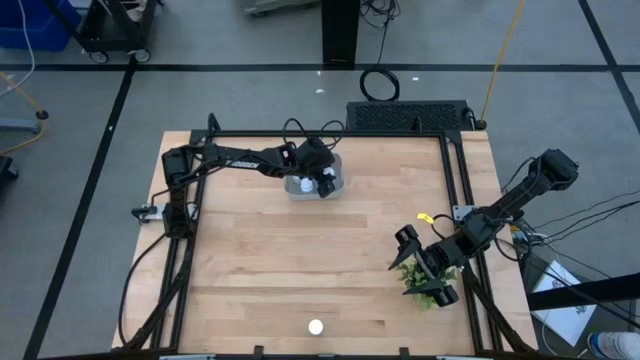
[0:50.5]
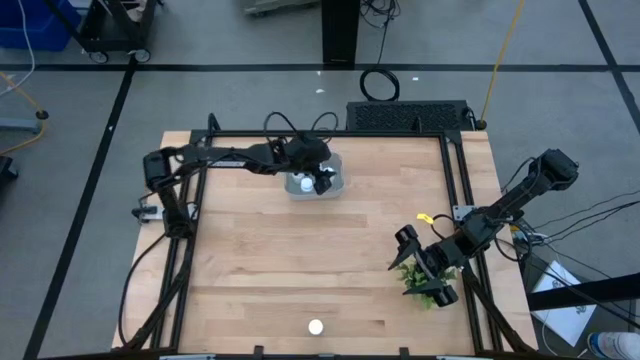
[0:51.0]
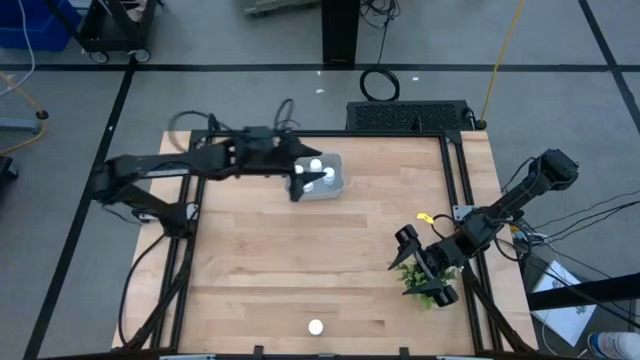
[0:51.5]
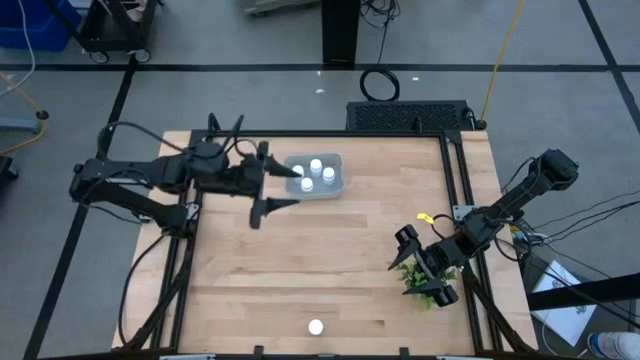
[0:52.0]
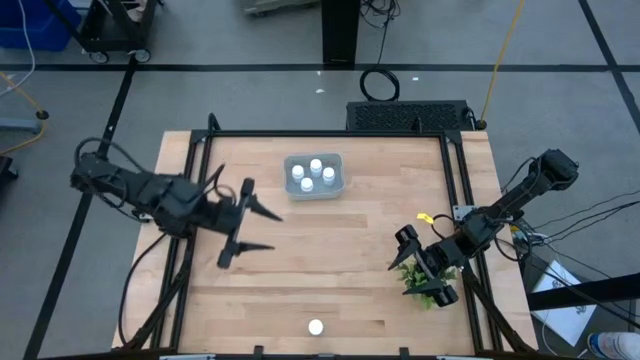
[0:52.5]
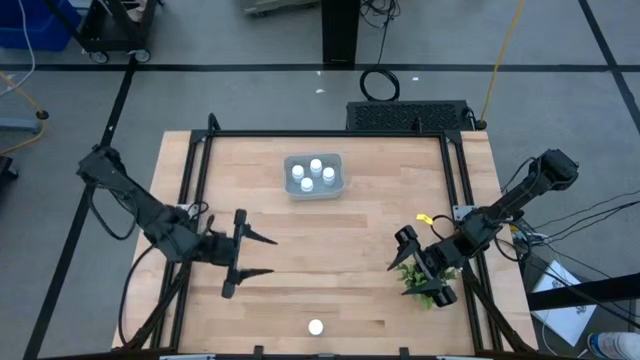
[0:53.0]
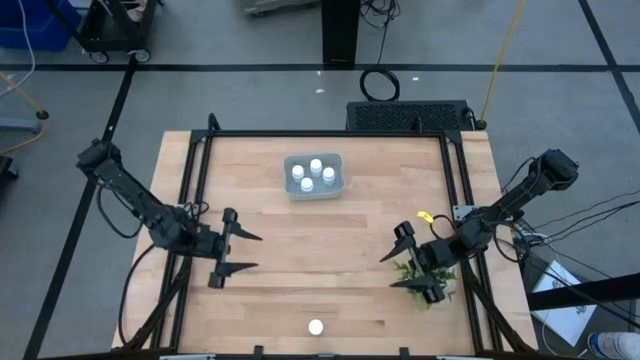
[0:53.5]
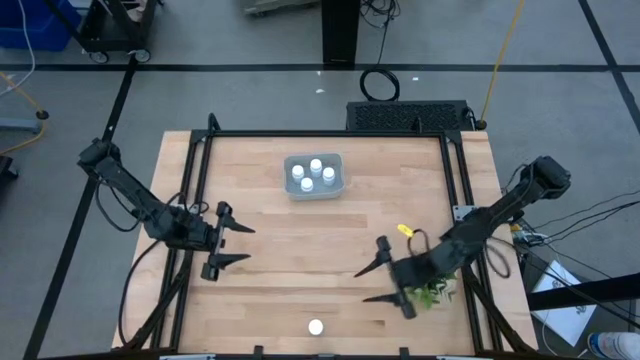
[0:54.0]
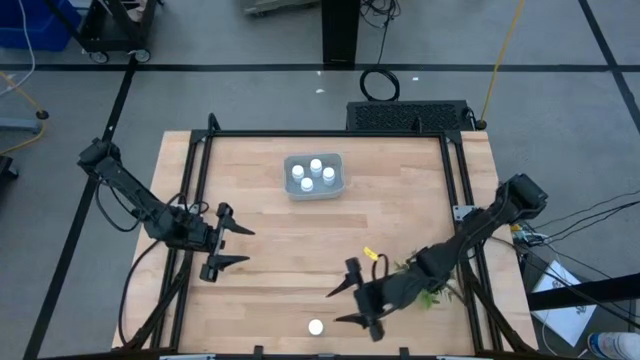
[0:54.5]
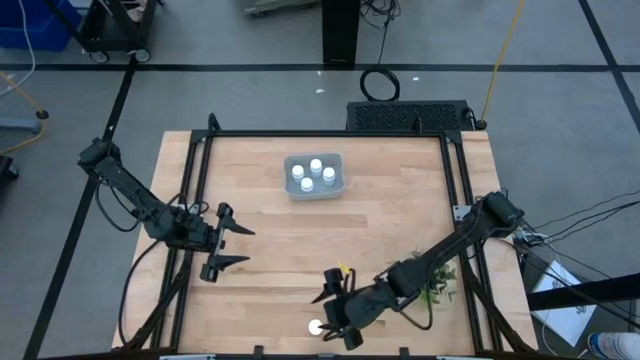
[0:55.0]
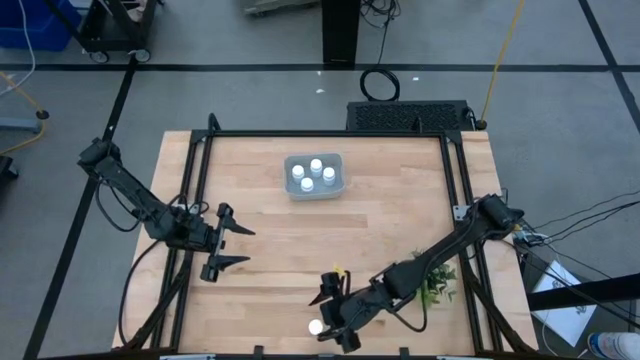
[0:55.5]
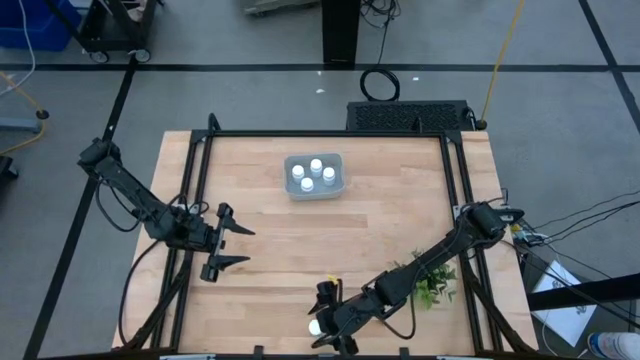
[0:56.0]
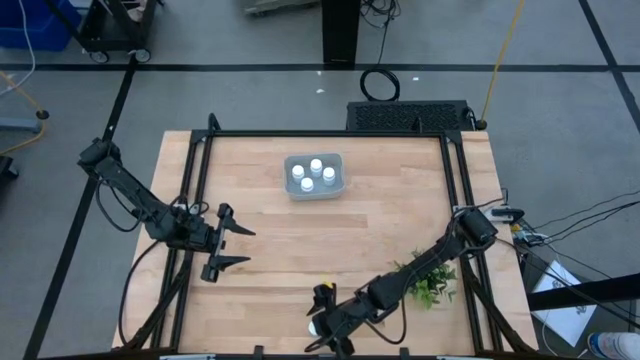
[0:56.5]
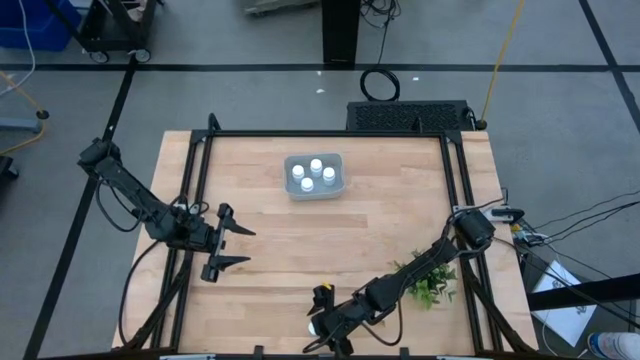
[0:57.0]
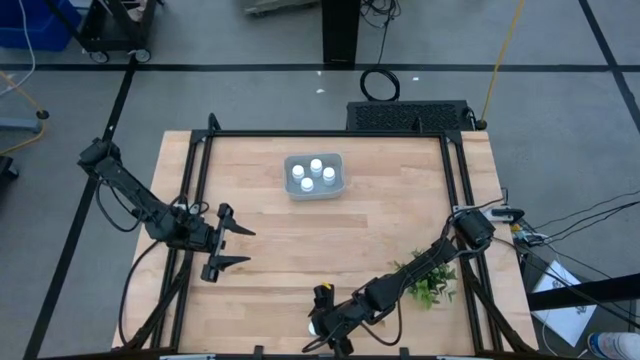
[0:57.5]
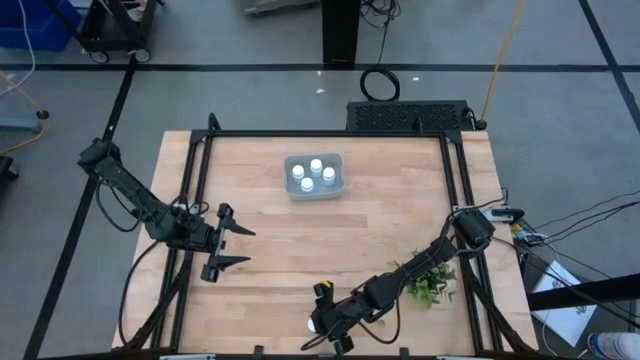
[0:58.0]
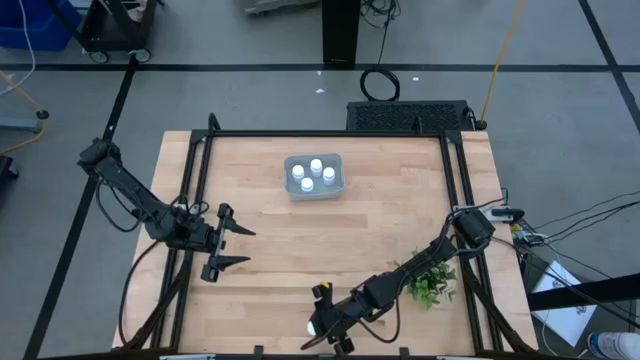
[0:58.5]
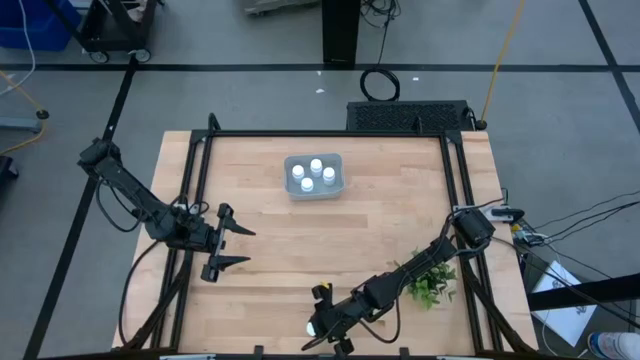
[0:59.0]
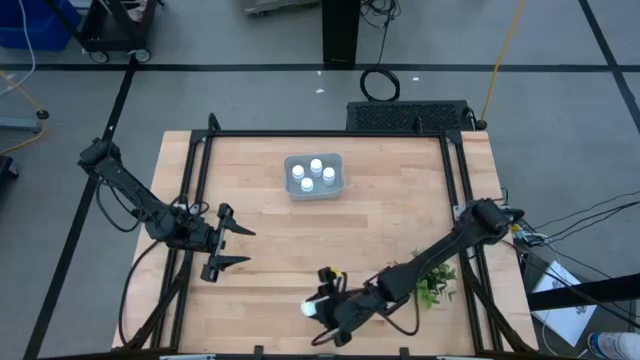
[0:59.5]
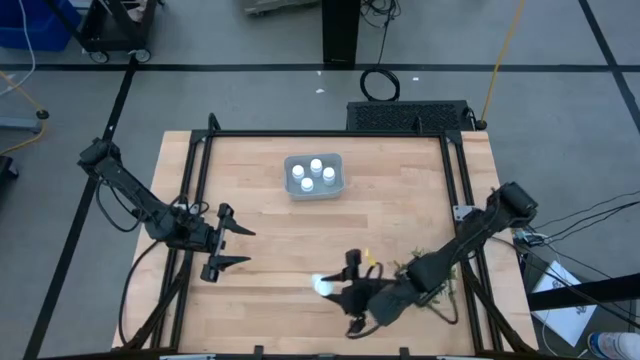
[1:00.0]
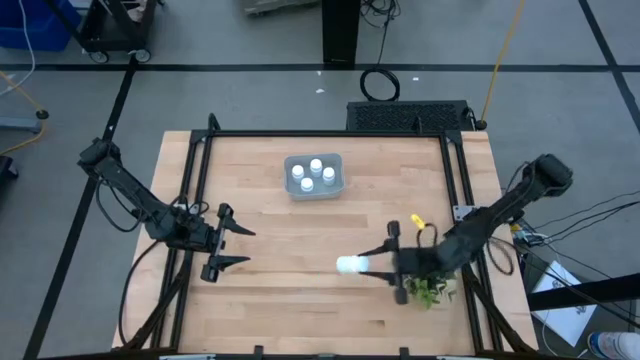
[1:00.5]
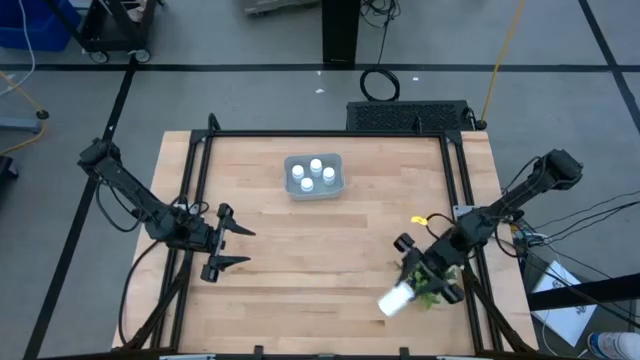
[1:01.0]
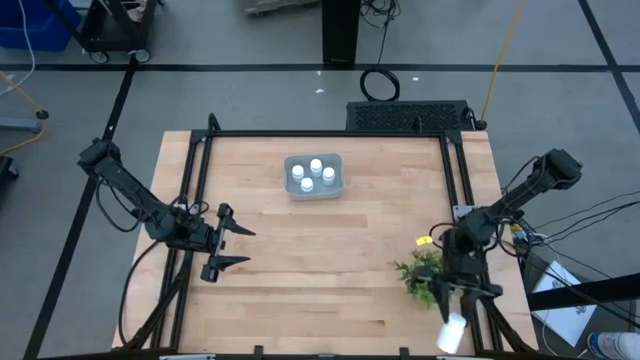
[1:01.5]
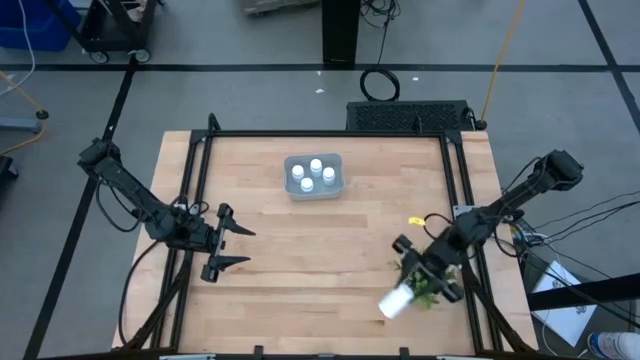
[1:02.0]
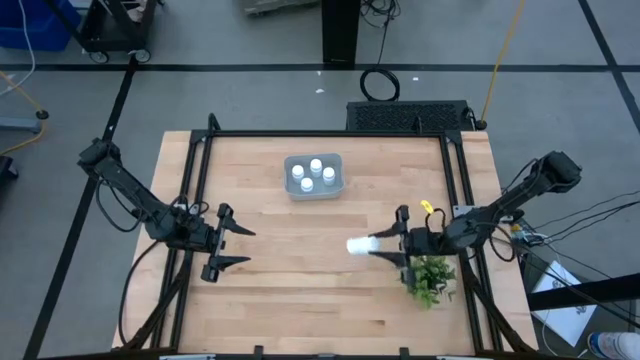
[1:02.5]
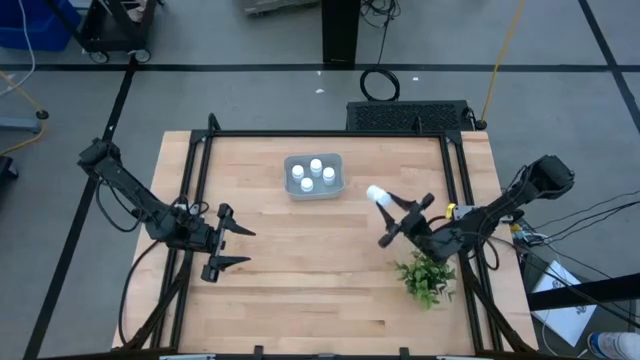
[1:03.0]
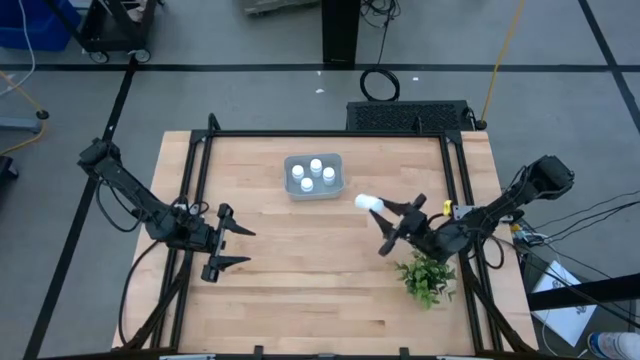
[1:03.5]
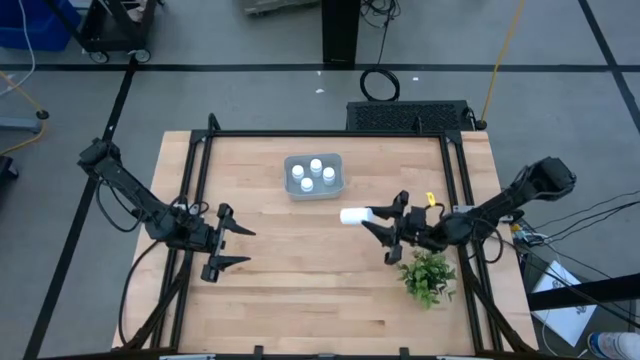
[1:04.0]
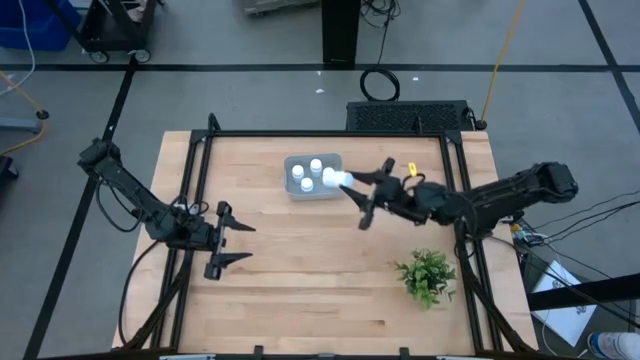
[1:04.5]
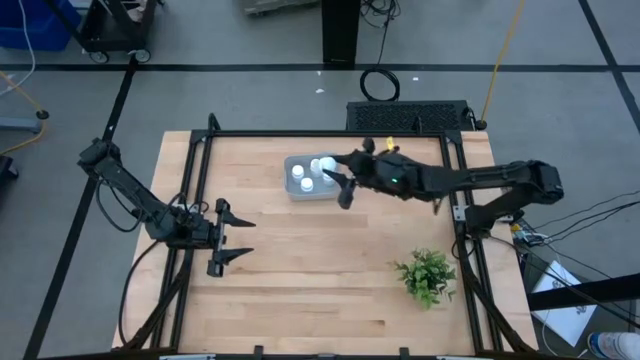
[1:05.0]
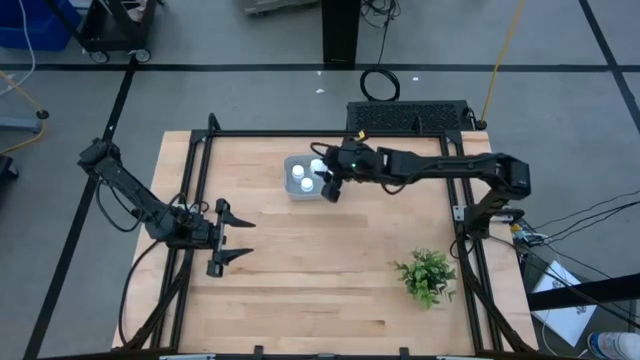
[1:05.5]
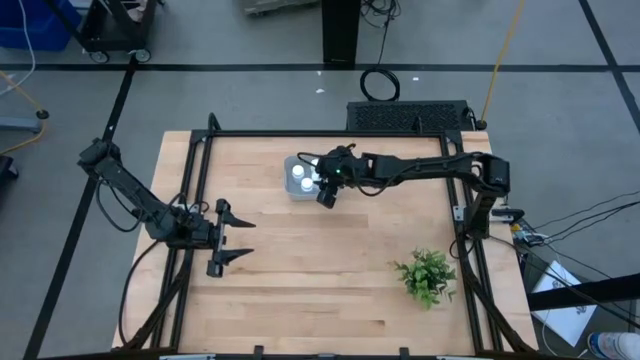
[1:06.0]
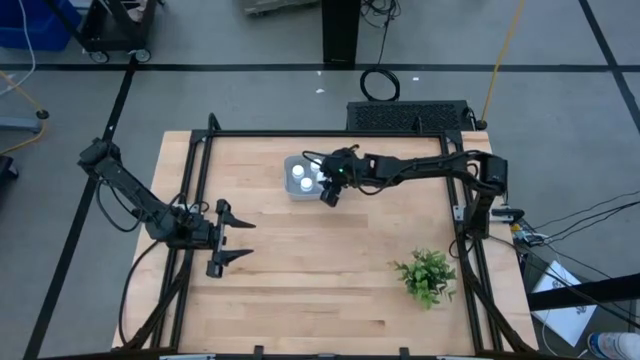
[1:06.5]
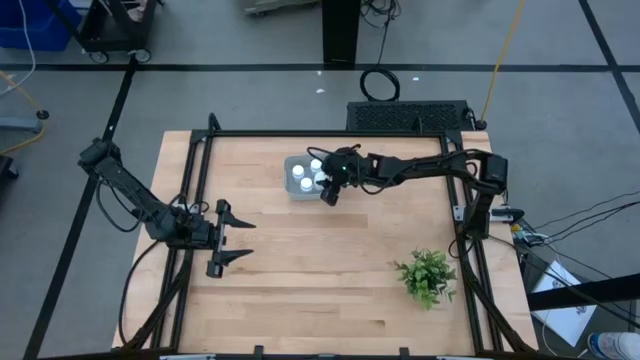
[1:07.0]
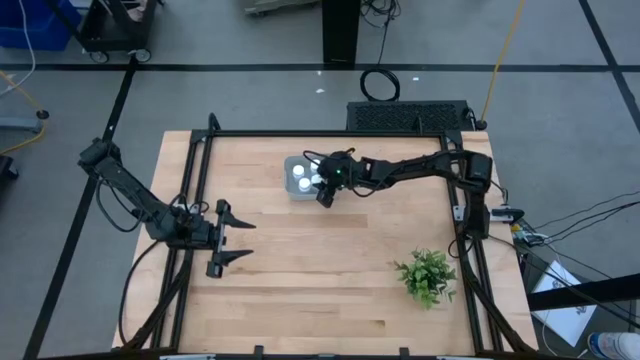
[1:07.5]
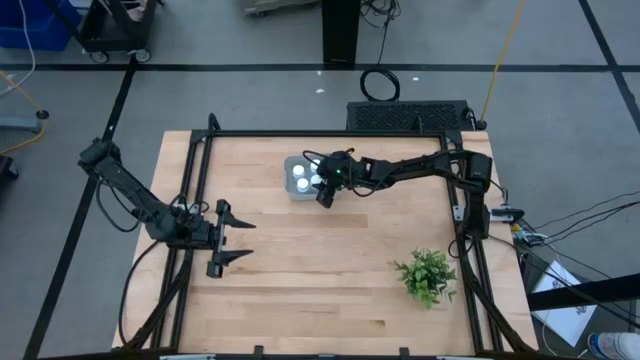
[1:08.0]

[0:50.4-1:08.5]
Task: Pick and place pill bottles into a basket
Put the white bottle into the gray bin

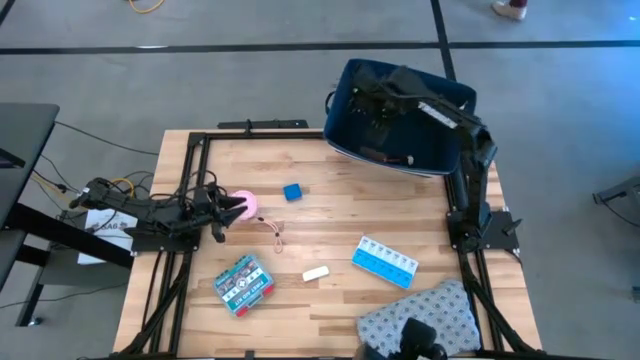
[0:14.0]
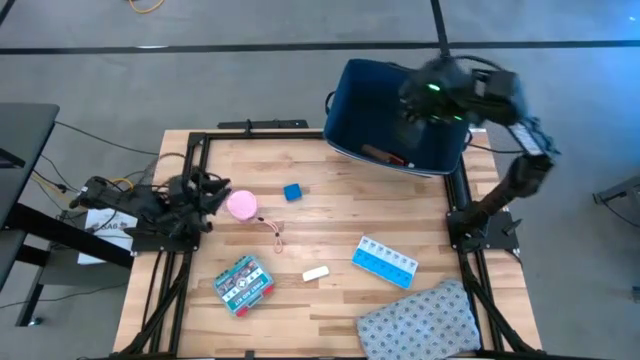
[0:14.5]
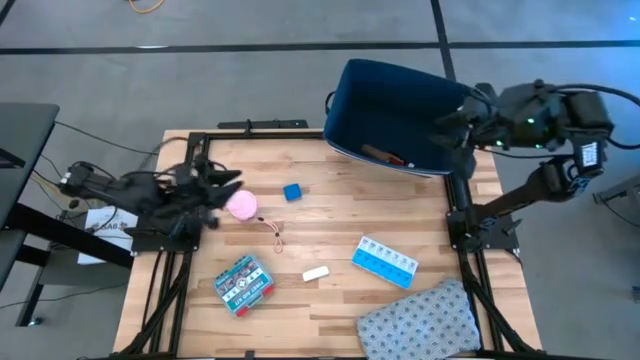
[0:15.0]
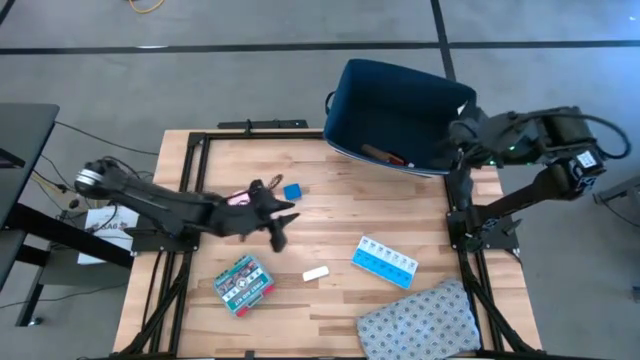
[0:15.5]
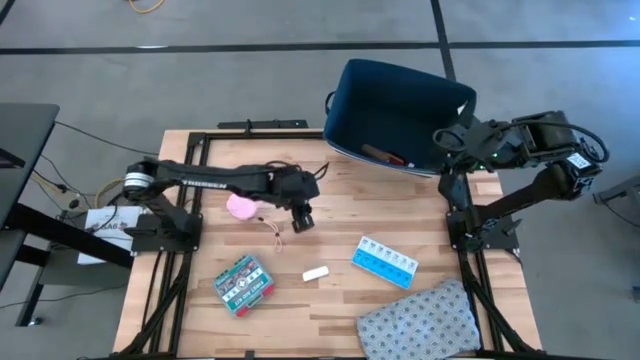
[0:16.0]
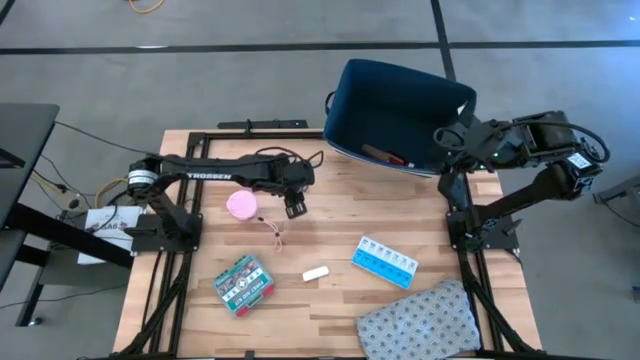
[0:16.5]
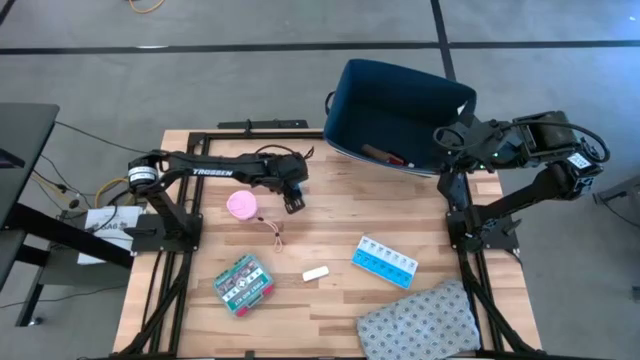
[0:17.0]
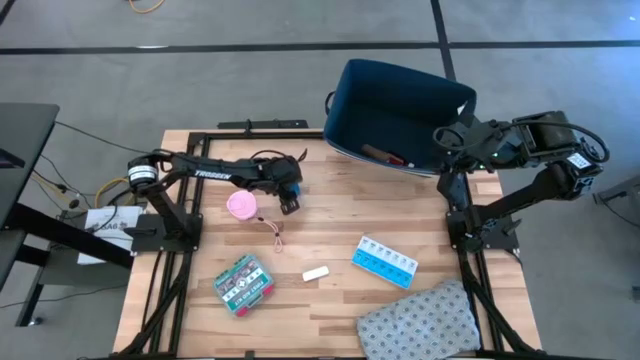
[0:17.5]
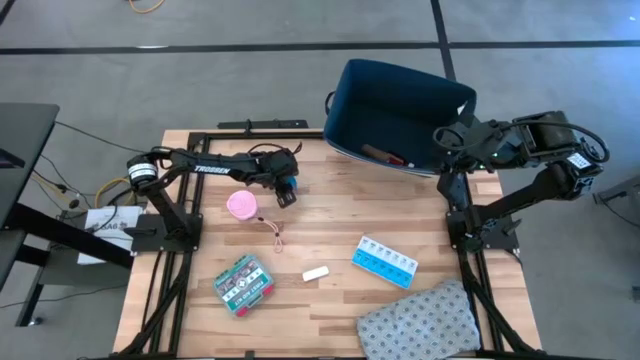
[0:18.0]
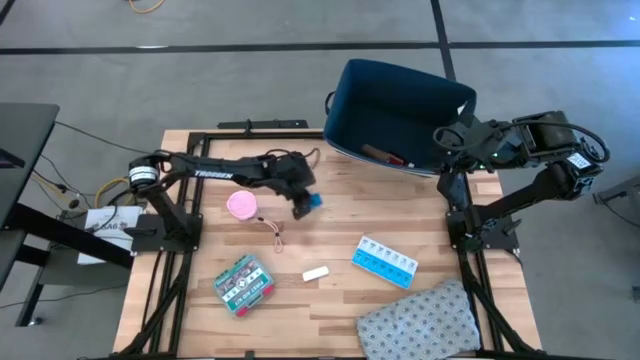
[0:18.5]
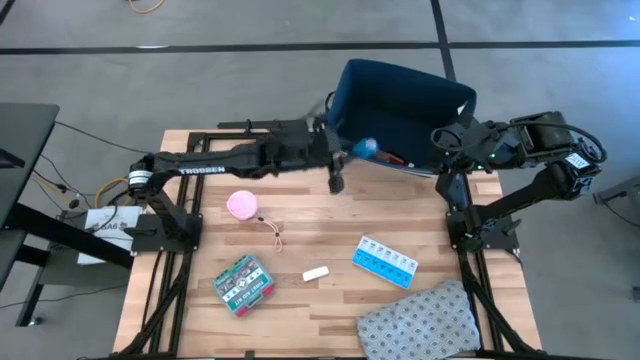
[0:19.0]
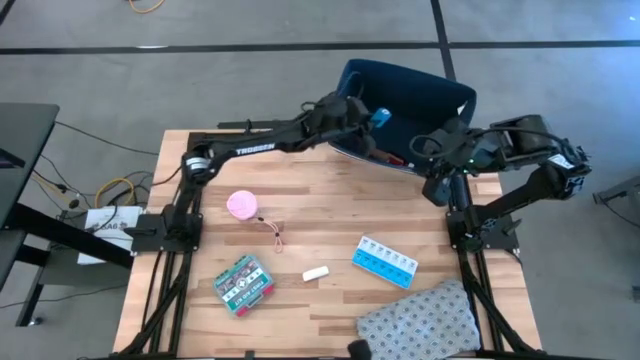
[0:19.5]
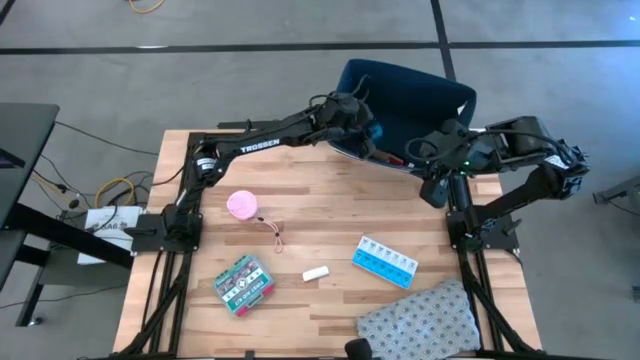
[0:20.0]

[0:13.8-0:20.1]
Task: Pick & place medical supplies in basket/bin
Put the blue bandage into the blue bin
